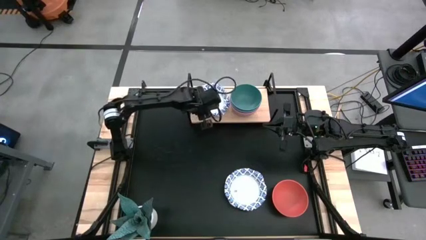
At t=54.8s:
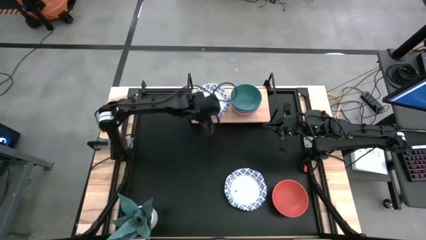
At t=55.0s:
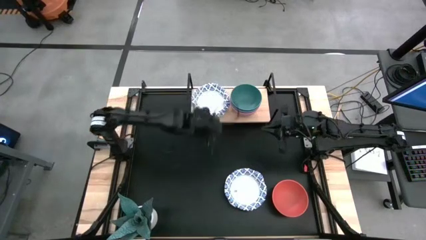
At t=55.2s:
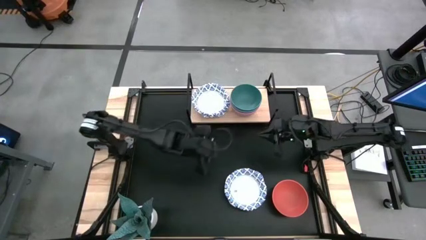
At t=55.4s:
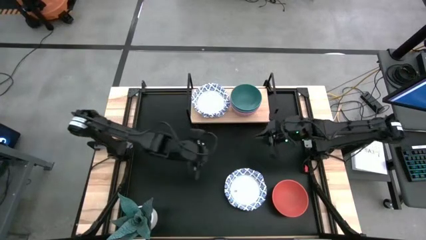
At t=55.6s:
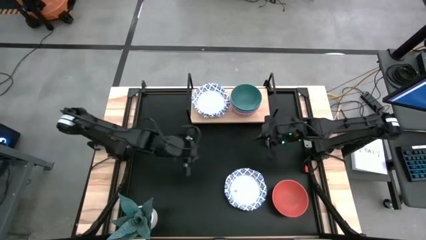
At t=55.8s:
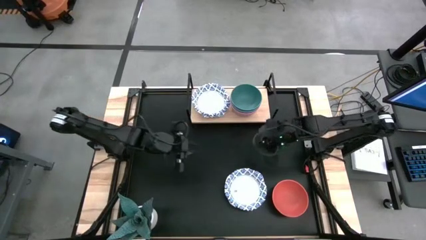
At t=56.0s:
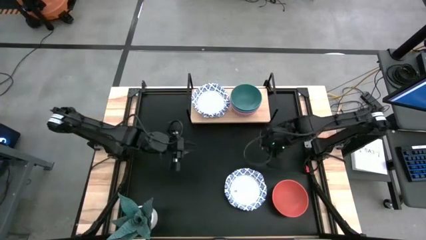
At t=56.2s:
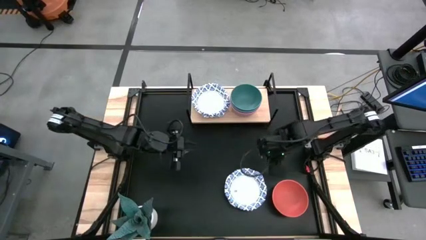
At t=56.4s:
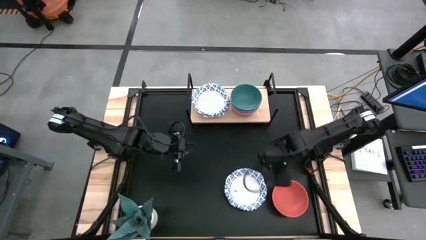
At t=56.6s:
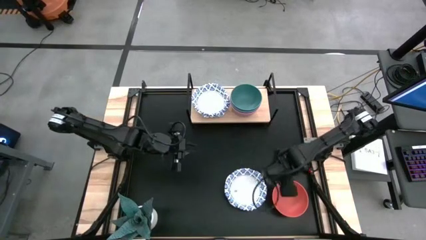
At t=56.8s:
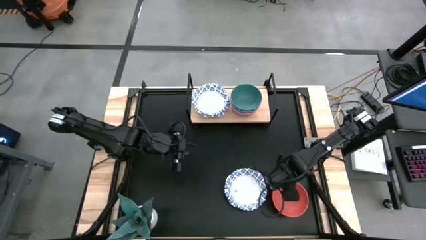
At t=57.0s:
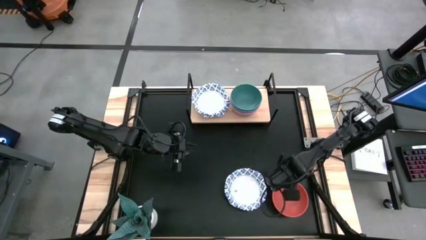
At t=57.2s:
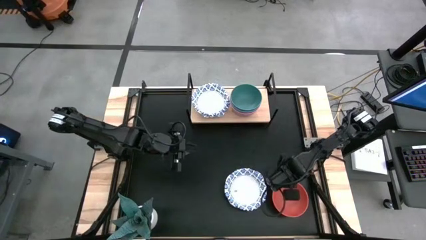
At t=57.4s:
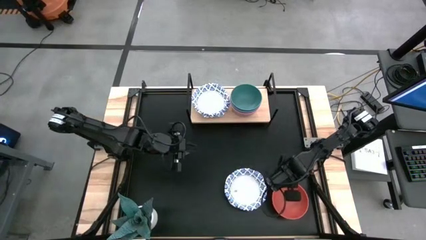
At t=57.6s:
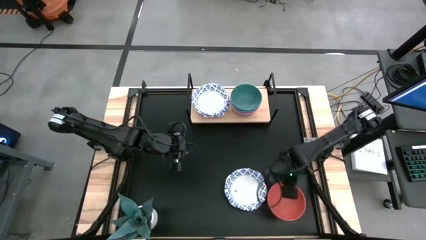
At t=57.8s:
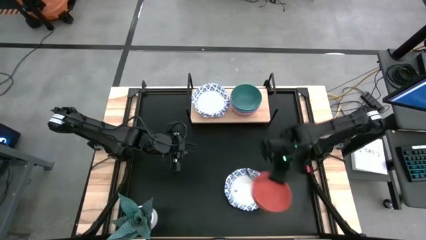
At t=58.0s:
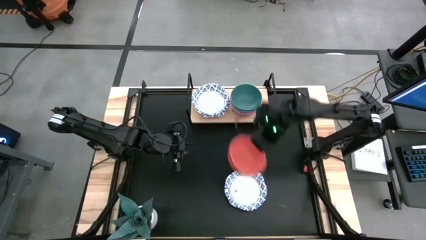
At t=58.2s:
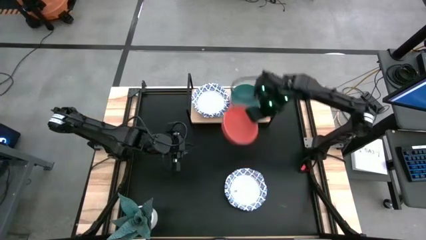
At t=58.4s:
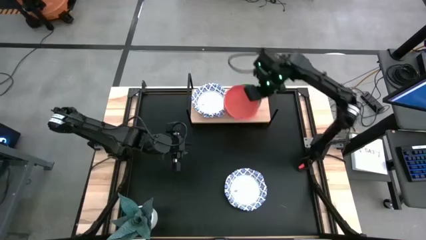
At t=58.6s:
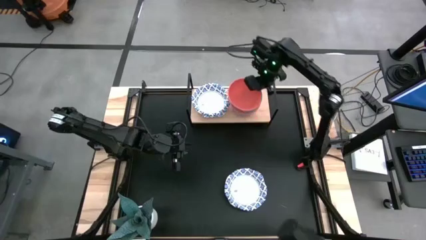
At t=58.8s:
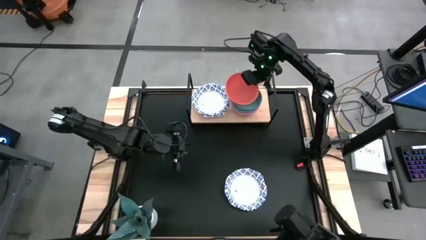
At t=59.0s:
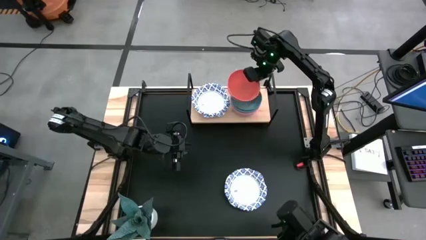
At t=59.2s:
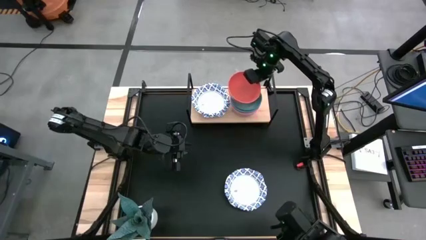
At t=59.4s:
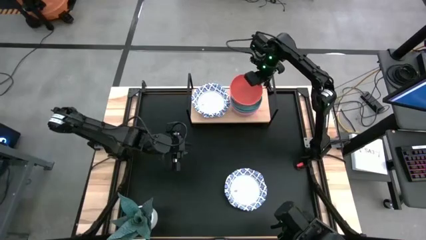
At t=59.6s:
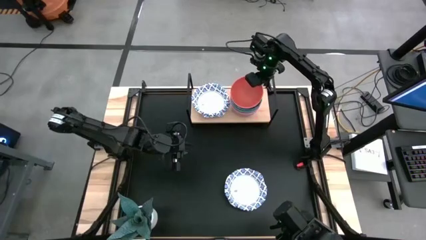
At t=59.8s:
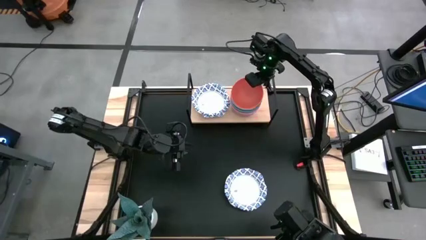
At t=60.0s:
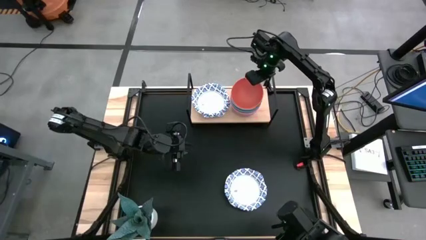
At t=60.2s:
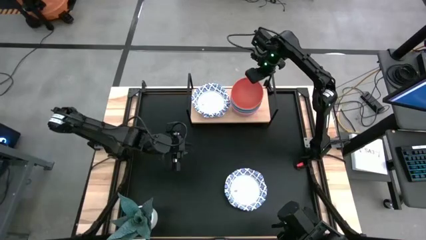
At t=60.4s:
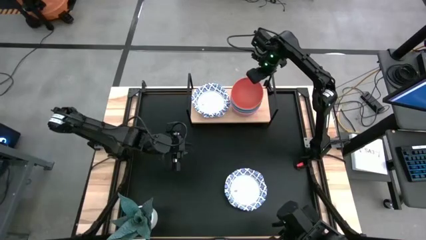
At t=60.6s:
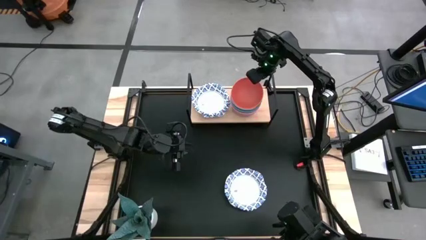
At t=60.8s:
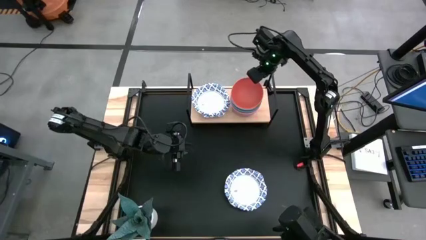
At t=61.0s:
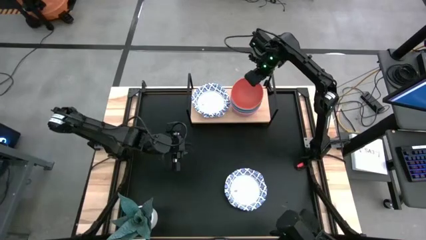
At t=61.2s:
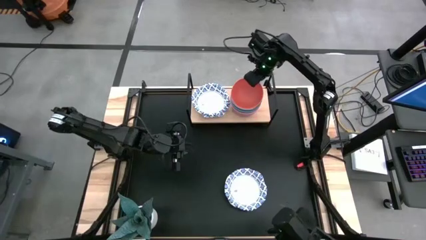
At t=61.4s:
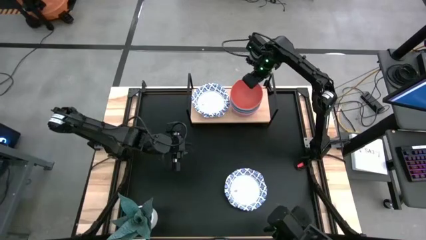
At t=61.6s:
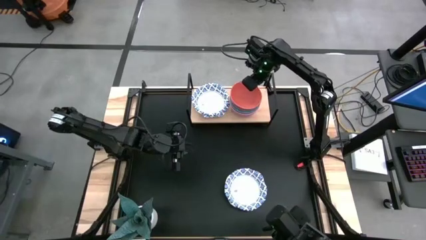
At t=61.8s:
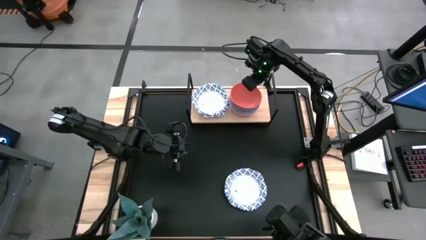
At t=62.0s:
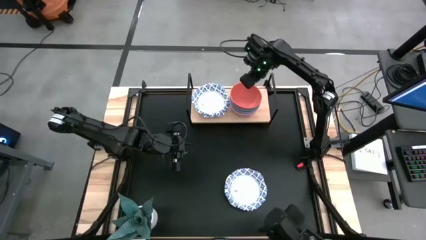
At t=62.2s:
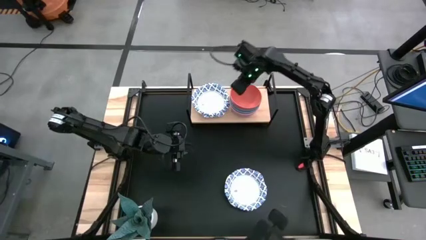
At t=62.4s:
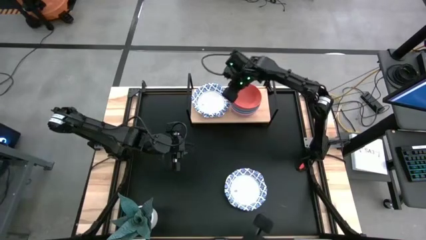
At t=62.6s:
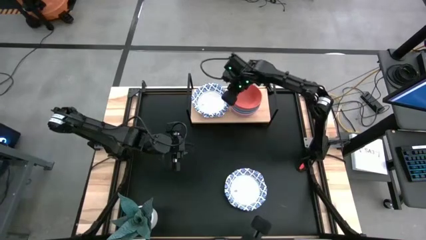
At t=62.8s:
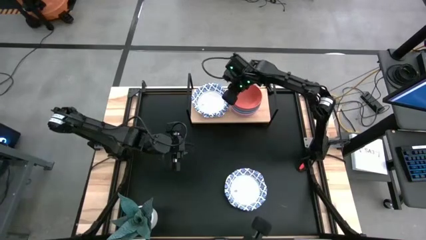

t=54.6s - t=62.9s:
Task: Place and stack bowls onto a shelf
Stack the orange bowl on top of the green bowl on the shelf

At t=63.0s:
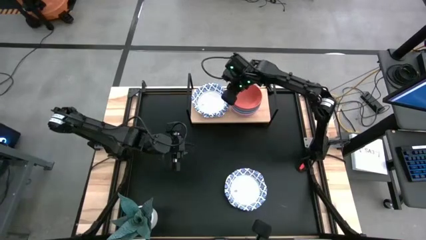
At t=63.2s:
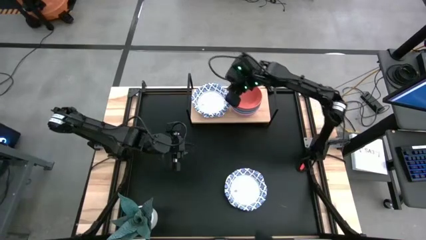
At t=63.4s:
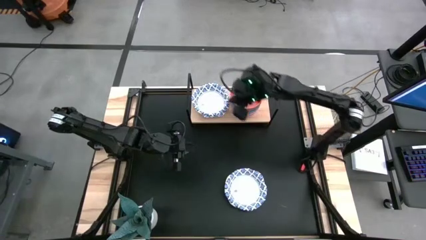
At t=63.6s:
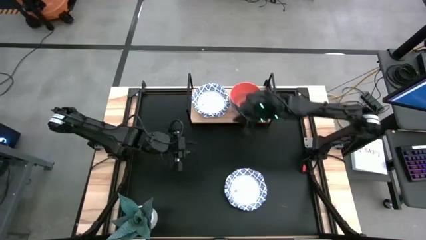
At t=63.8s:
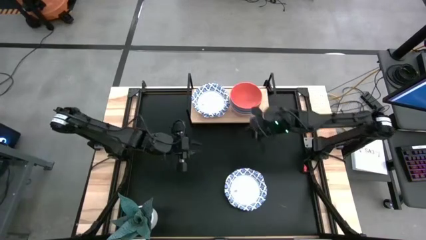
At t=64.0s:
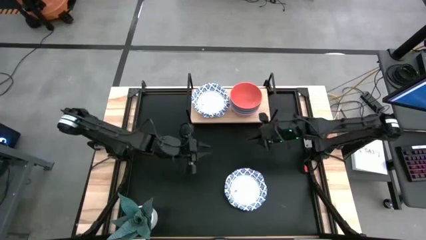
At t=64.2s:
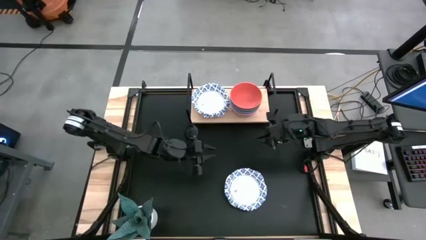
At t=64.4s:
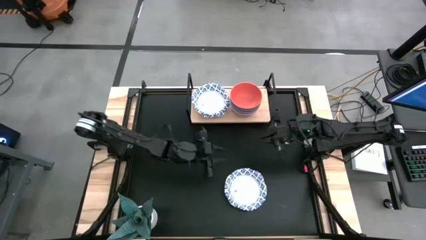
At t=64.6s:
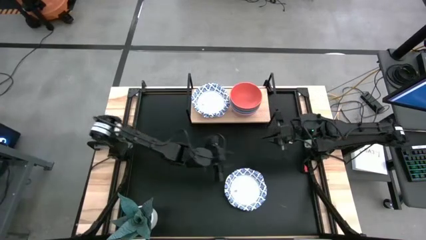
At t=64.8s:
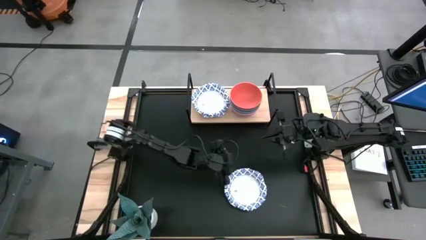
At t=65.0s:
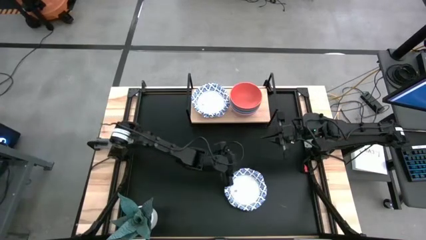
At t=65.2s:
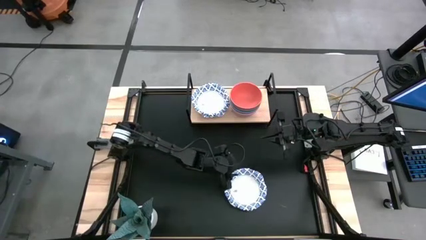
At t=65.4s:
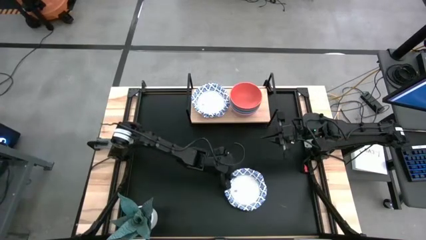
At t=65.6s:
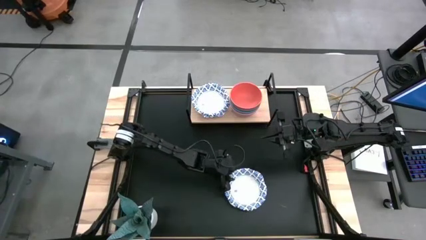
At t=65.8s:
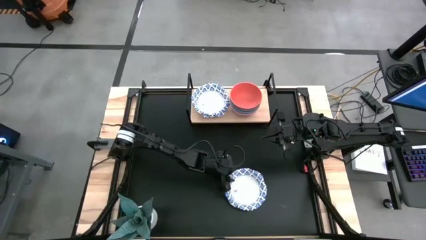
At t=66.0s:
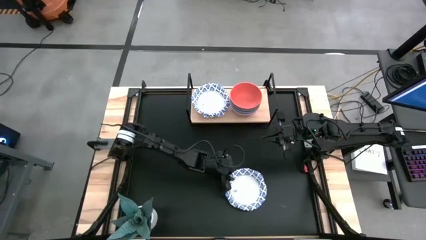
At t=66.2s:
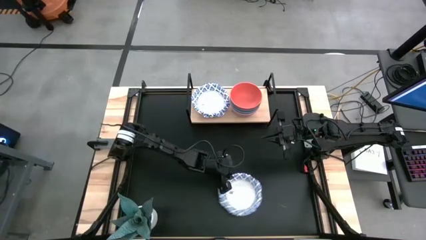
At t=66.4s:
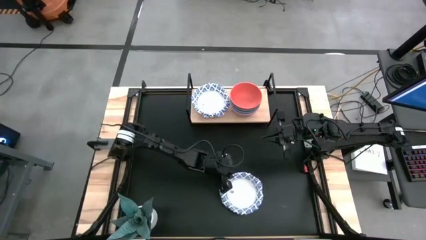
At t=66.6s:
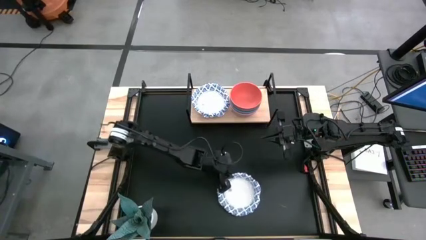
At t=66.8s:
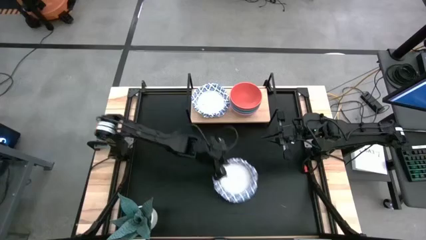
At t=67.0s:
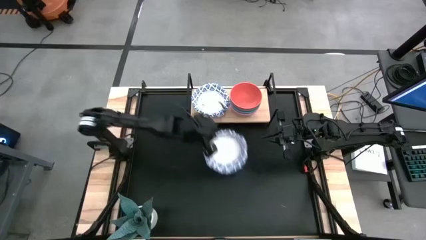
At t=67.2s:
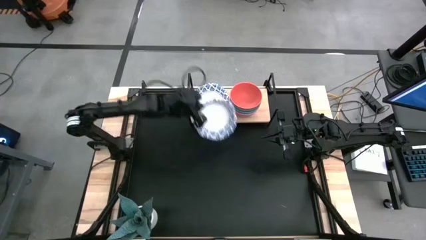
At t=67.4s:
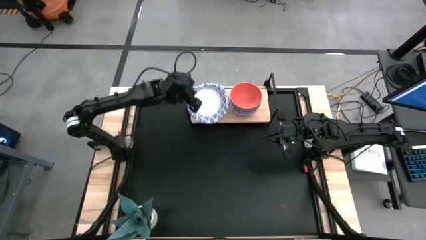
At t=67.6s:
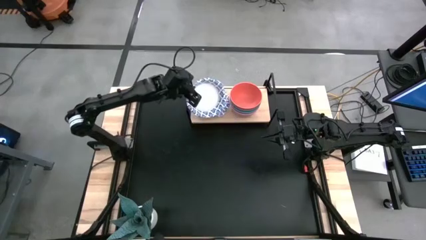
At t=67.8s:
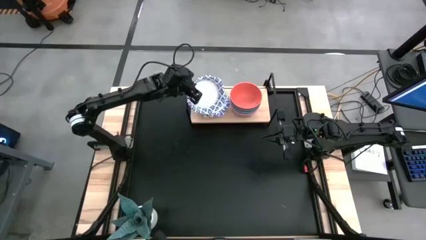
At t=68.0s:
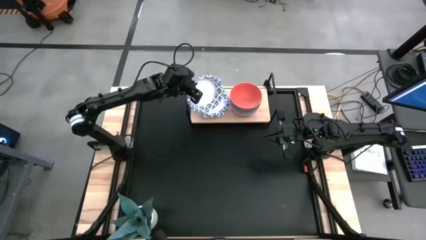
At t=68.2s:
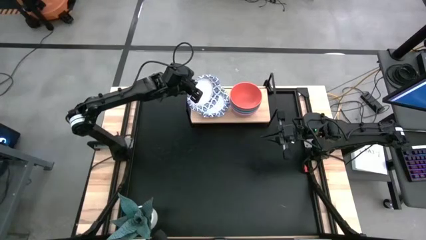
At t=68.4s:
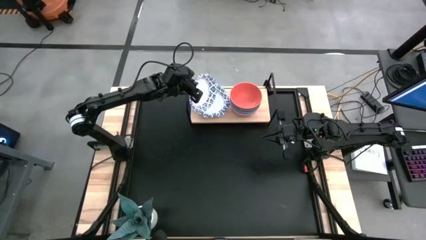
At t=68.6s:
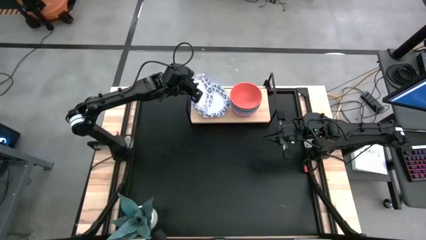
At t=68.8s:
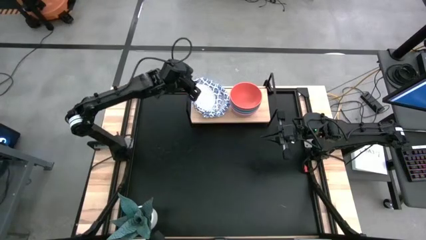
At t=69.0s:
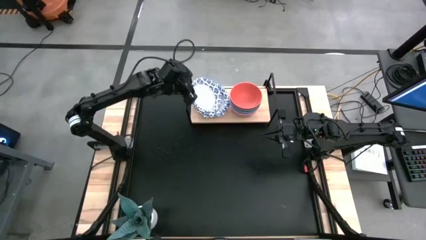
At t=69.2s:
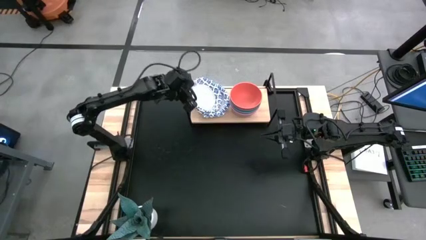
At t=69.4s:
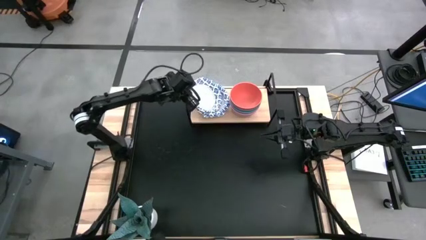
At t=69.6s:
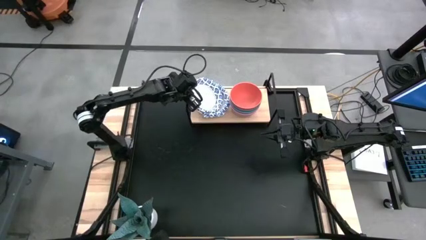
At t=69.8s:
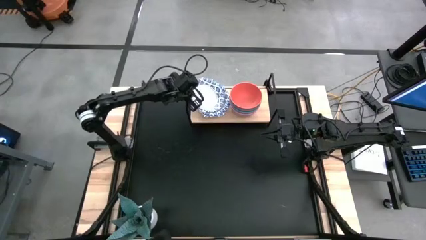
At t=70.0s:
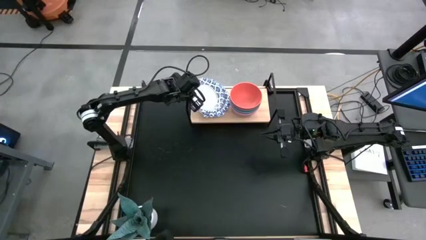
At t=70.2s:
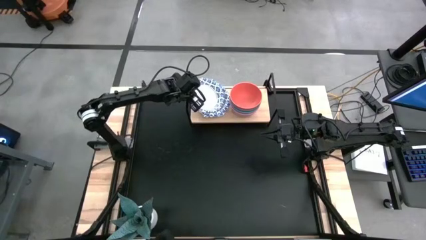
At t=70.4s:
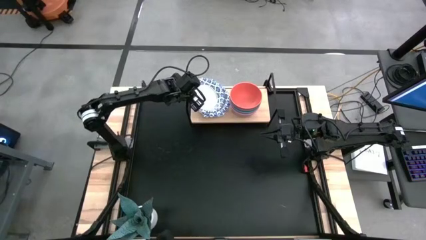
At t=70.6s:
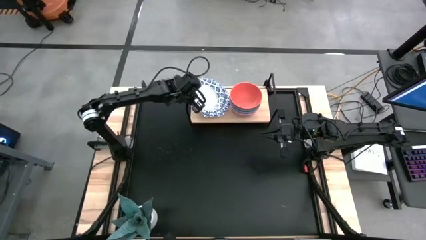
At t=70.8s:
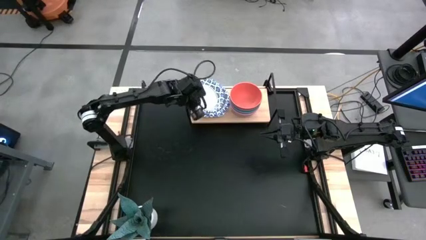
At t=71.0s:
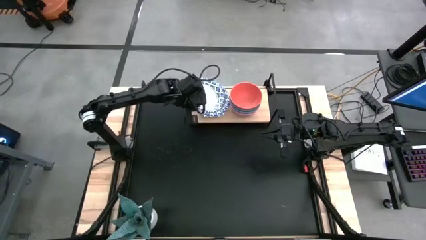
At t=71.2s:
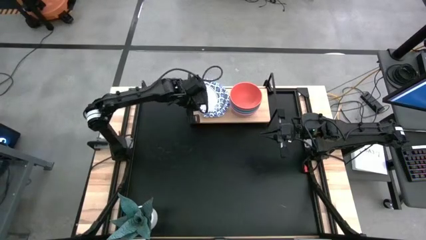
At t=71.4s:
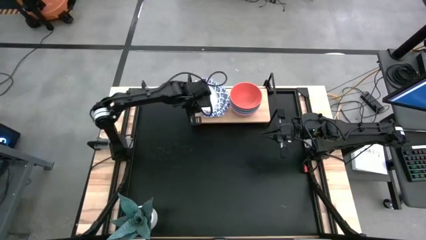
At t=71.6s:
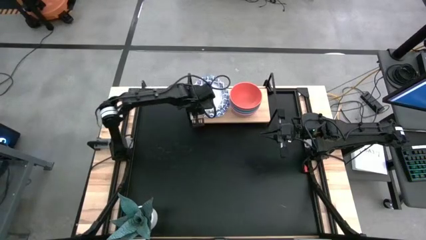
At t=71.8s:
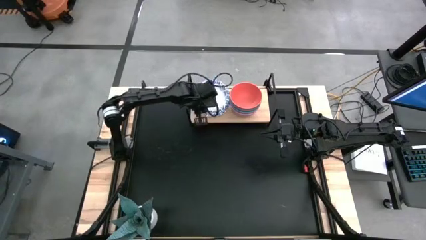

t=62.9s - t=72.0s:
Stack the white and blue bowl on top of the white and blue bowl on the shelf
